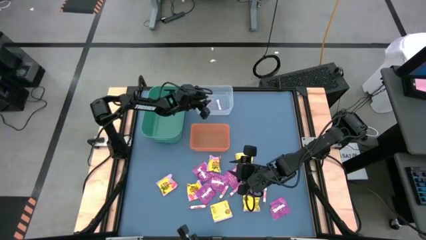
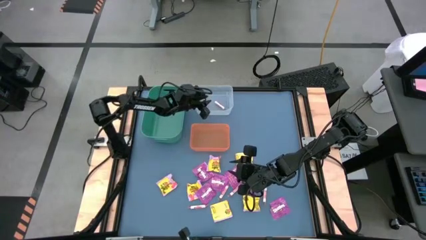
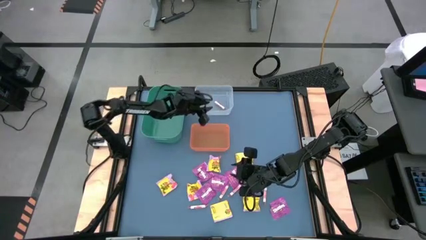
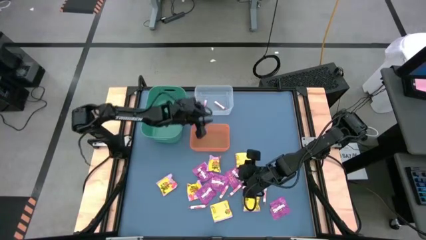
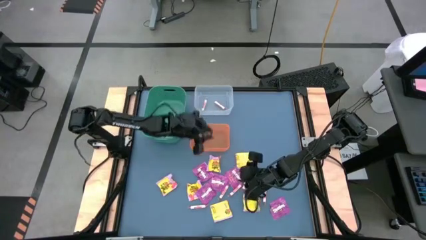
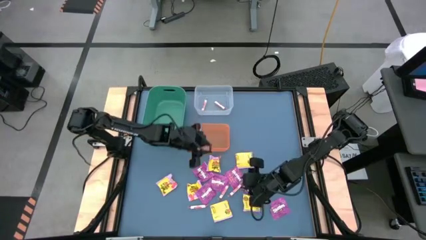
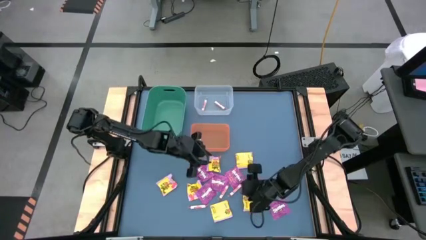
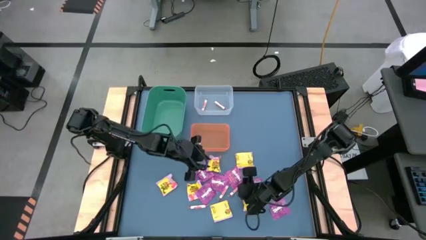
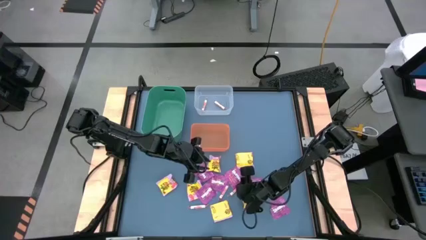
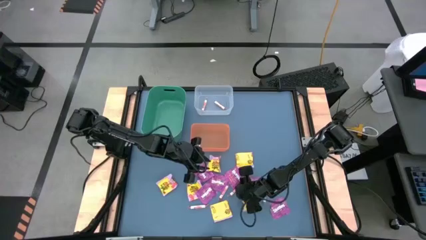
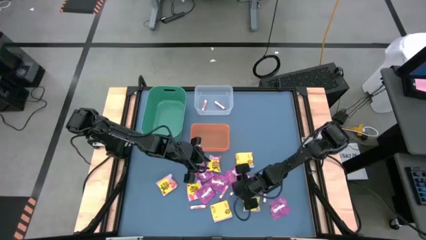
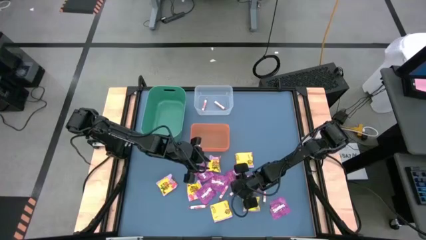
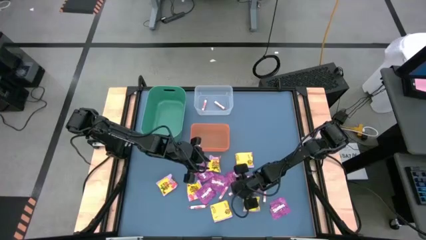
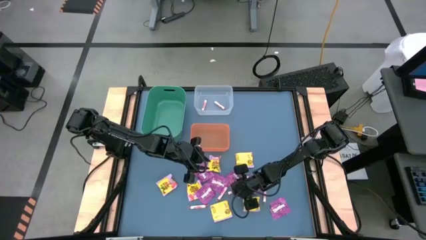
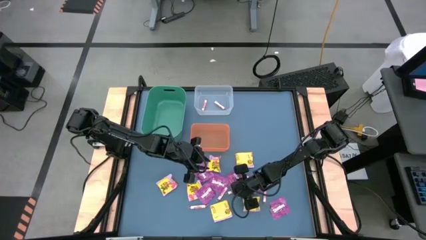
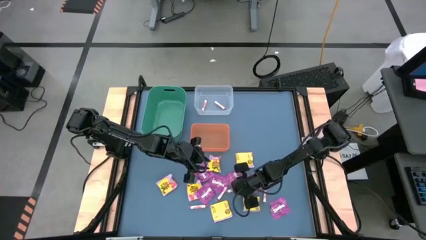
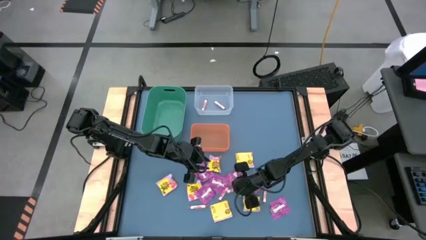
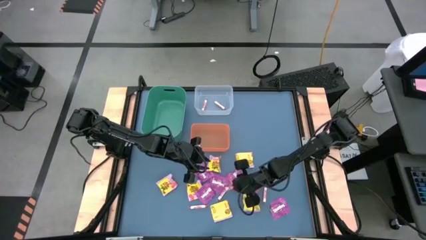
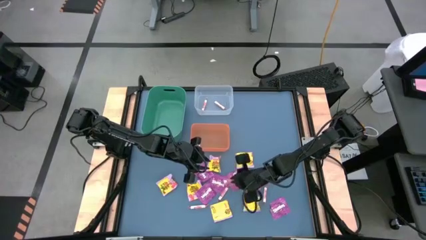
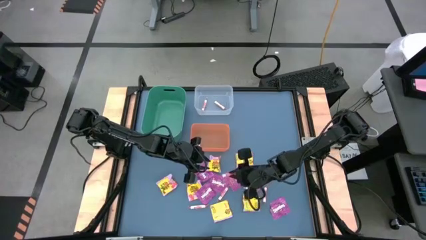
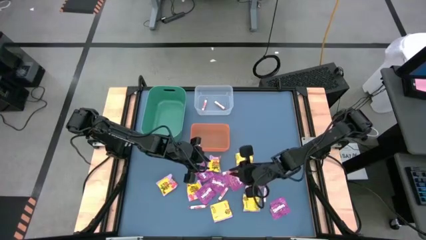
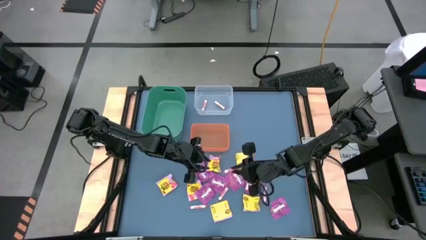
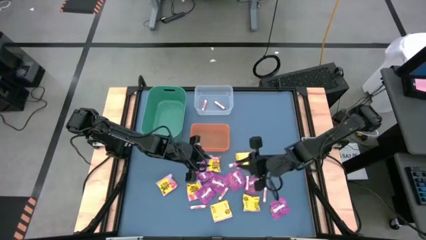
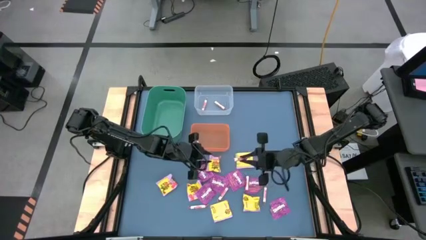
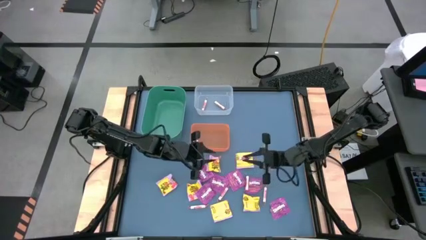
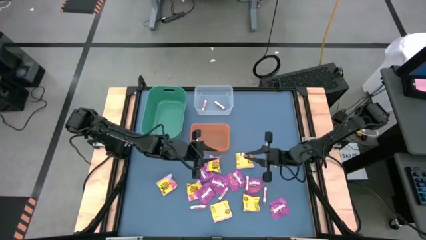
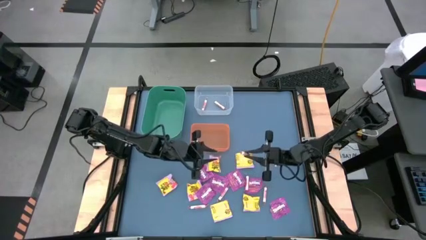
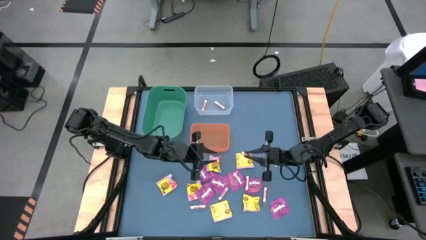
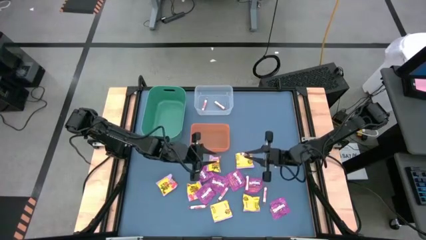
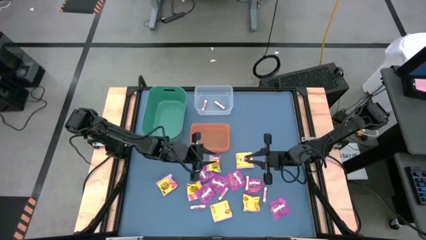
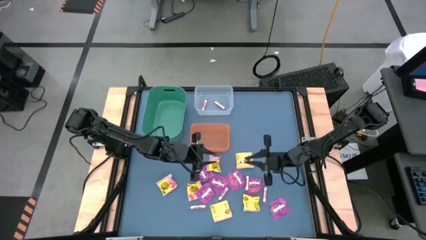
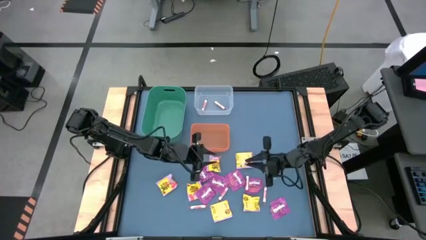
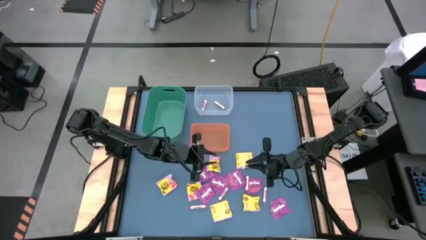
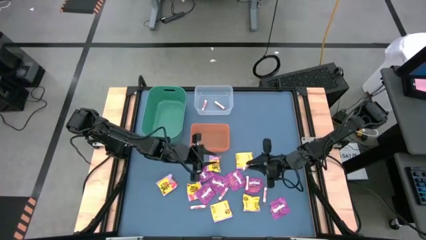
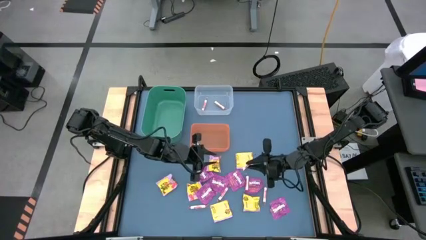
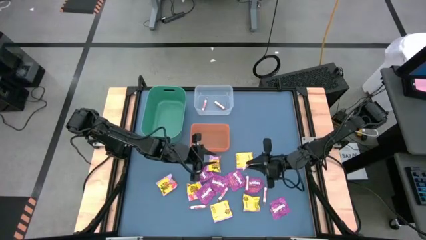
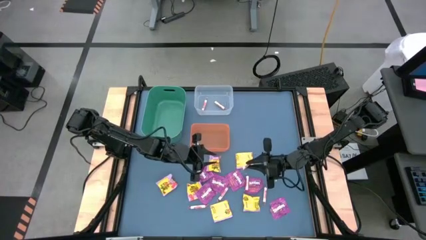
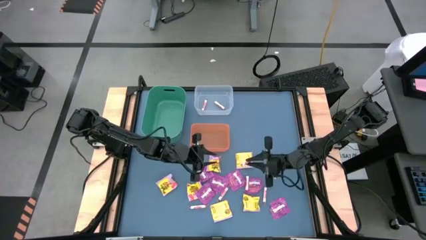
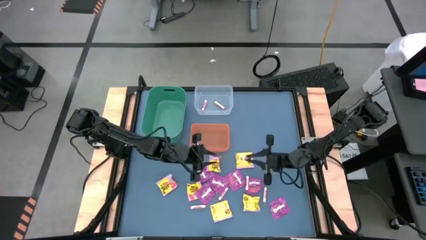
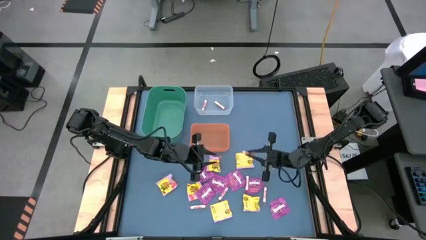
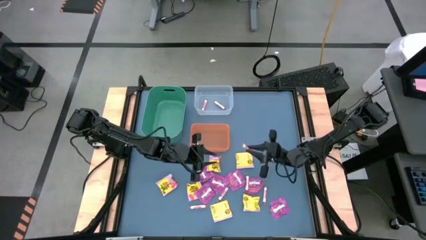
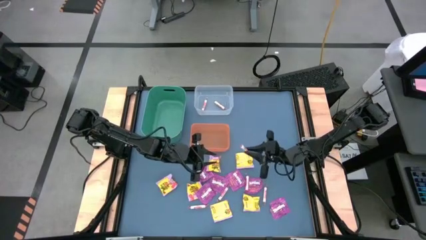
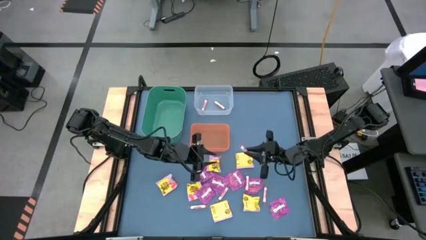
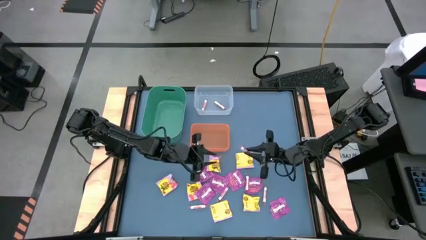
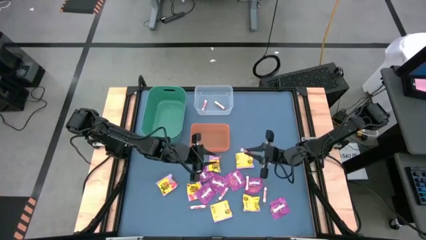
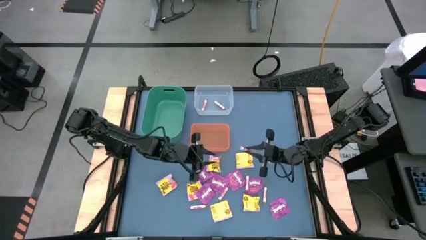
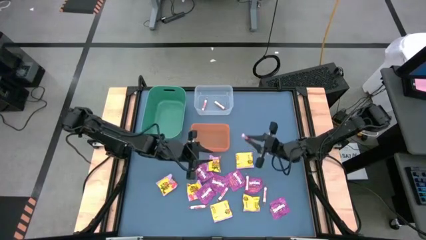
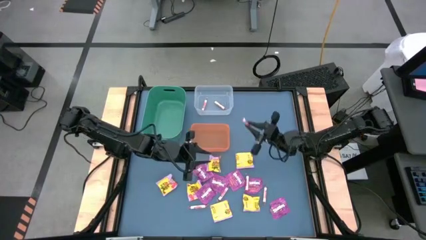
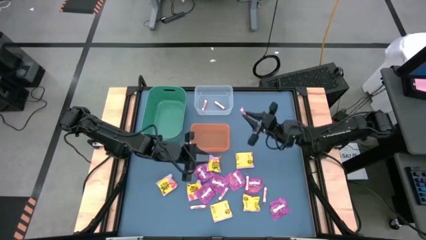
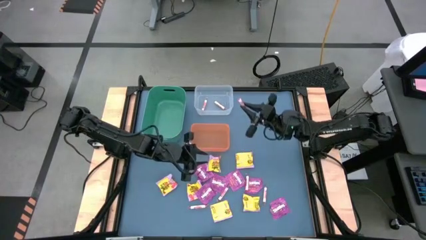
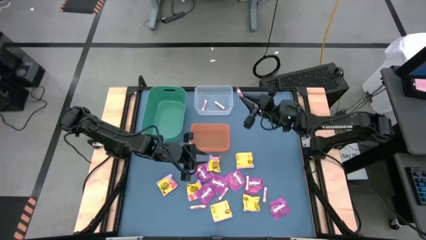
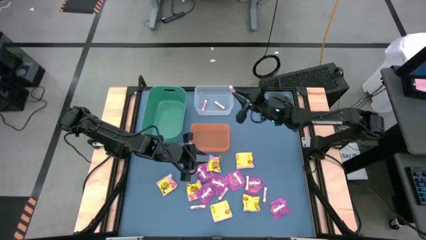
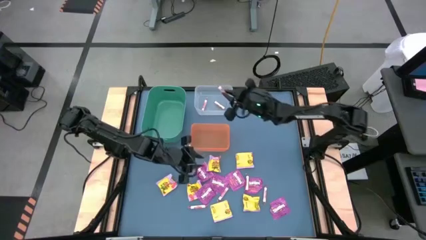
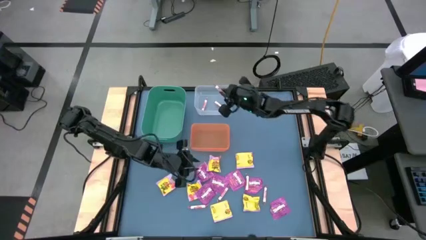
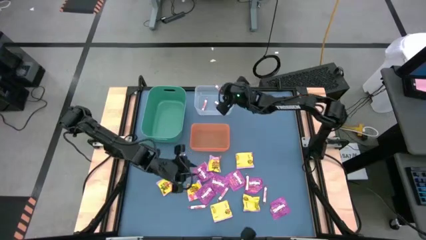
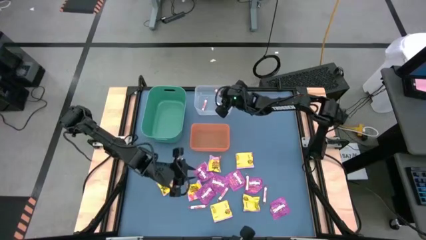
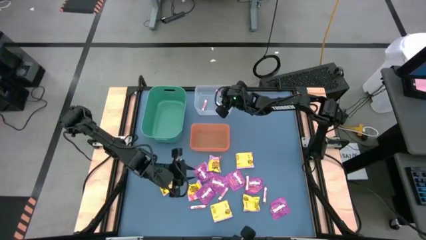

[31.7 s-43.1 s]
Task: Sort candy
Put the white candy into the transparent bin
